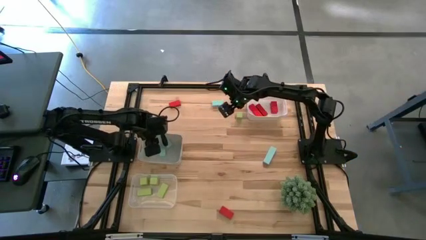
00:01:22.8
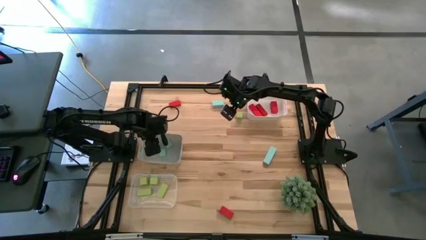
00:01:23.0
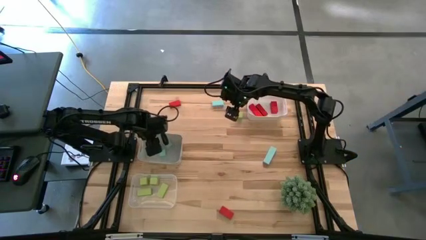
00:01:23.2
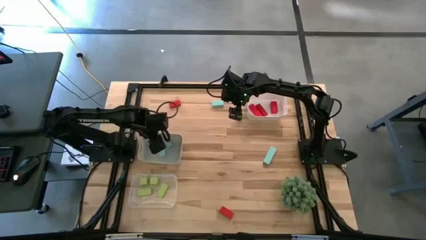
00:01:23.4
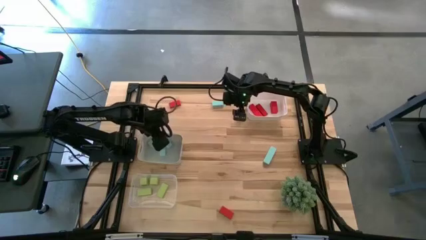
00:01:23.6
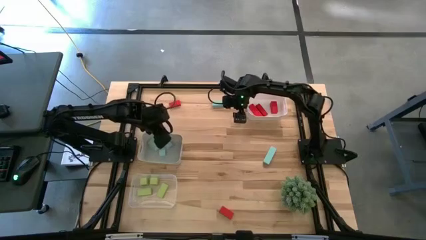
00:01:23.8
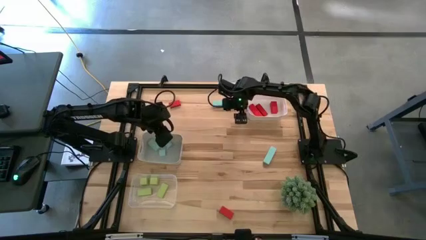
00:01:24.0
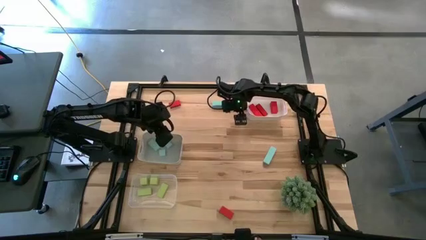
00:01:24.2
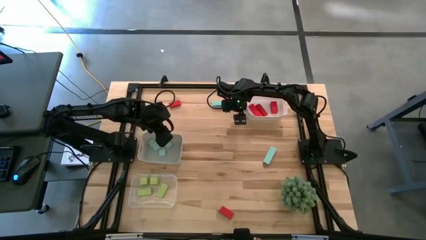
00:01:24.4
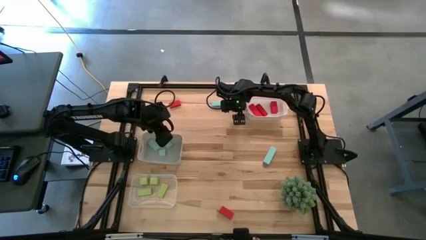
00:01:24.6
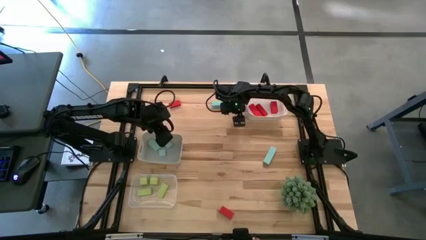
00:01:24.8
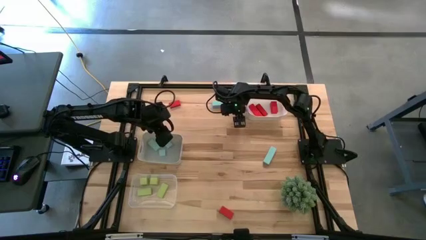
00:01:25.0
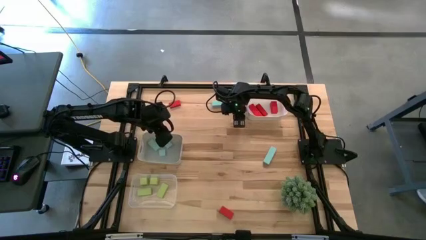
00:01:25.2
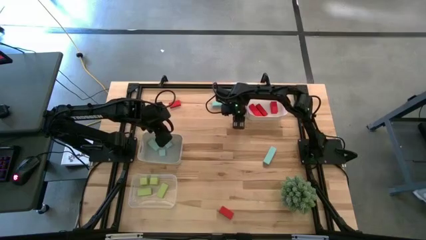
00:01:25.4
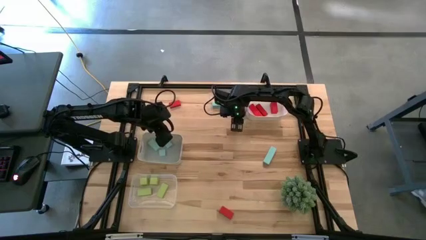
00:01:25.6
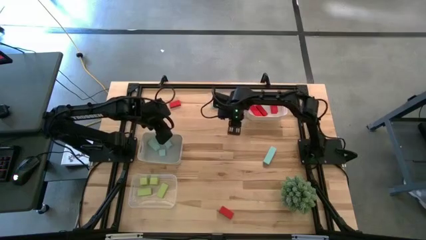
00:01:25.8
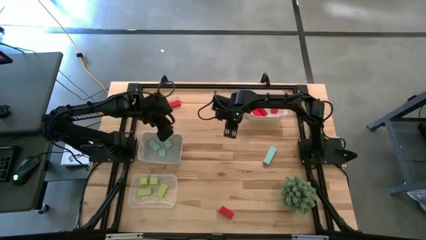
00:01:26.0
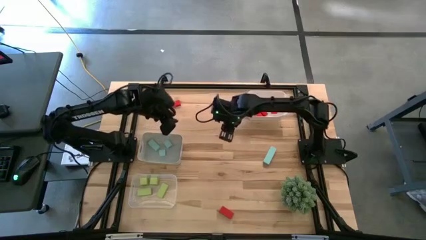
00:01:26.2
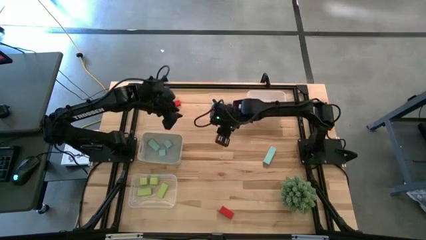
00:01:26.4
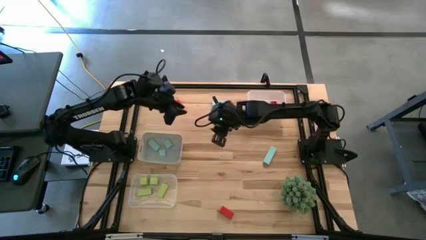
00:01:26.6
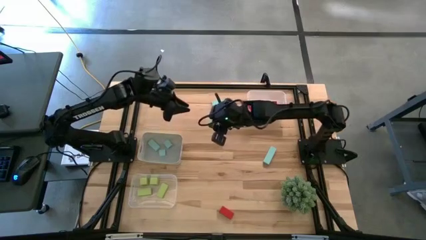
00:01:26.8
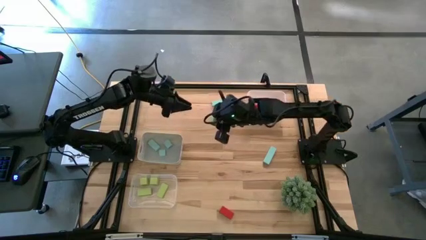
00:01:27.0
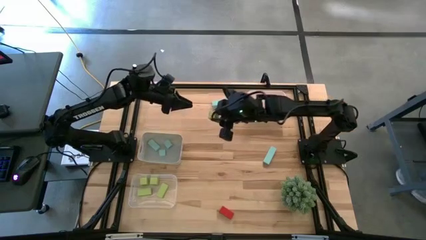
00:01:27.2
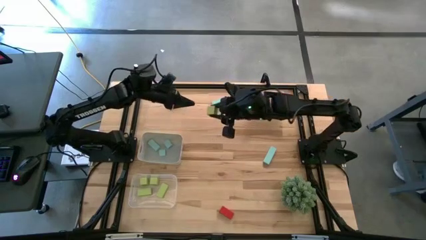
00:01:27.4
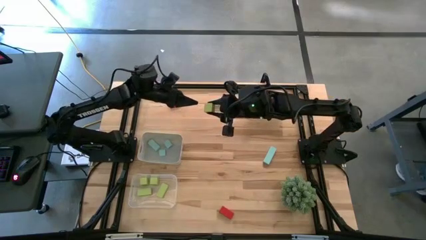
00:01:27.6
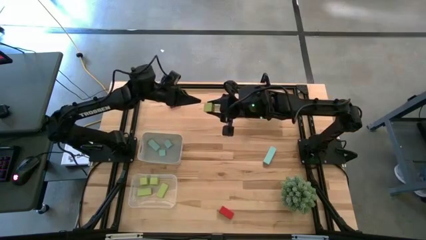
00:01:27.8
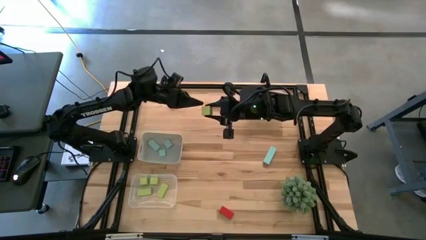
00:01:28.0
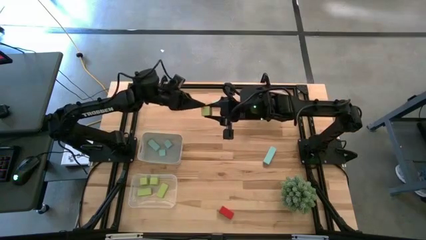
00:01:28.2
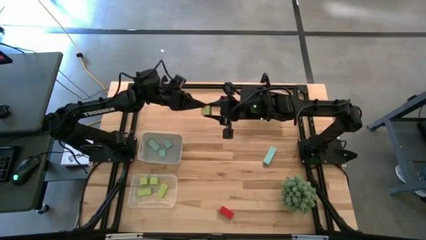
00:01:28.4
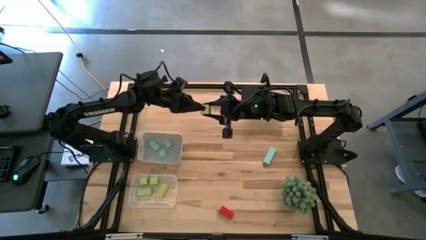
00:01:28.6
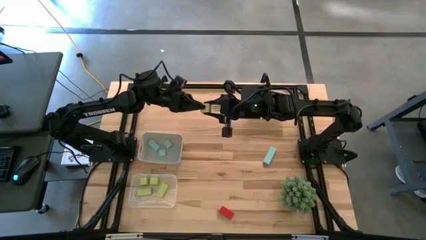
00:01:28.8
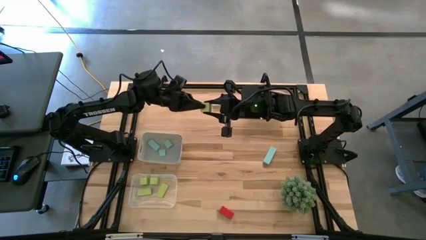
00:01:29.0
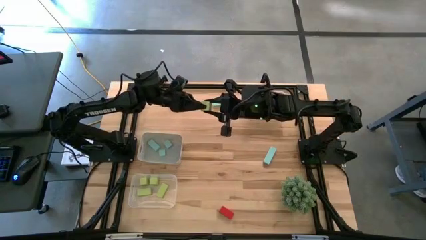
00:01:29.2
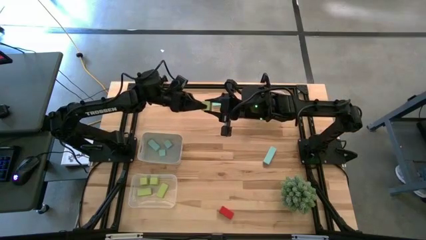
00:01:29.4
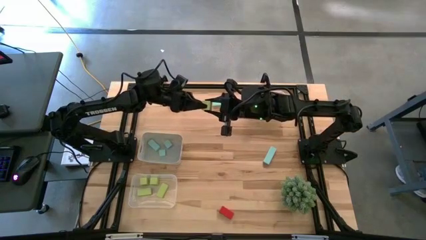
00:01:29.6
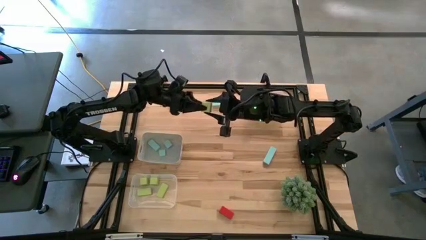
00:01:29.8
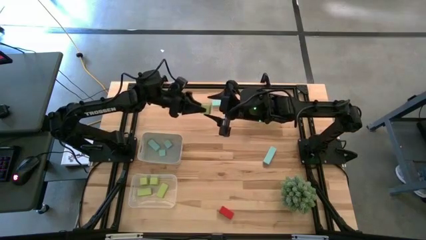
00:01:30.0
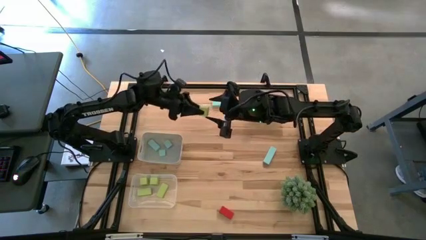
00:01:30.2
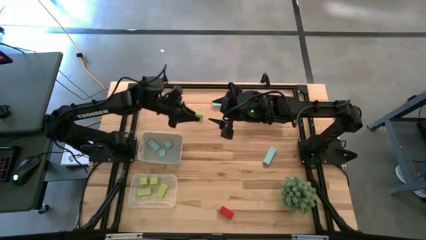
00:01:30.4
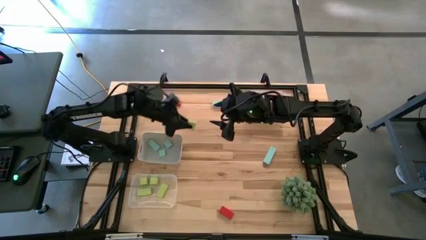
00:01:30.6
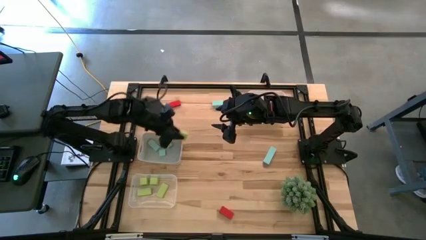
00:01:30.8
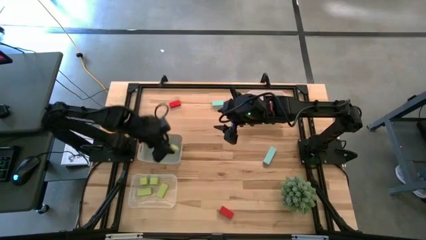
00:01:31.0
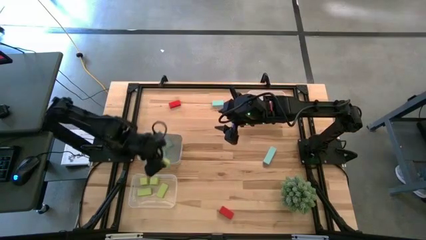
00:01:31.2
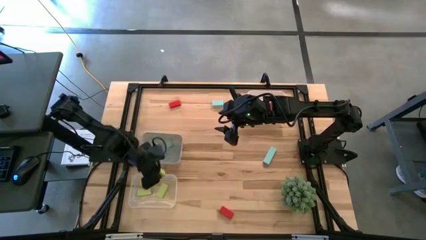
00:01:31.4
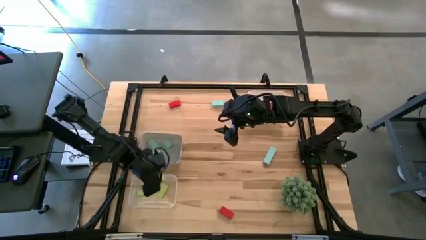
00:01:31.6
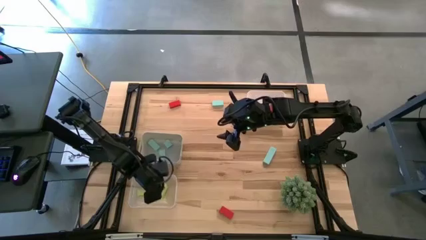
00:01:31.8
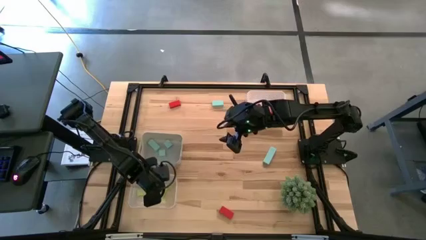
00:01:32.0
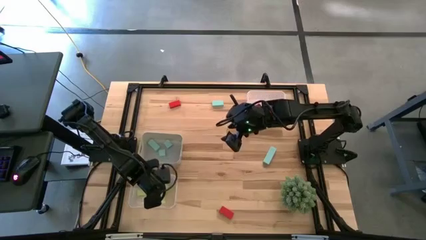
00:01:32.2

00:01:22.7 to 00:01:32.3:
Task: Sort & place blocks by color
Put the green block into the transparent bin

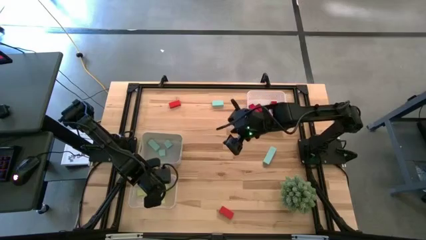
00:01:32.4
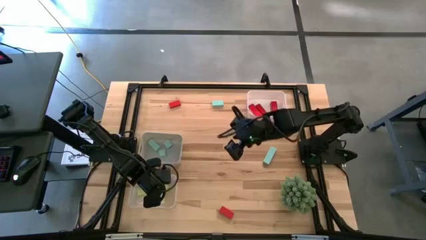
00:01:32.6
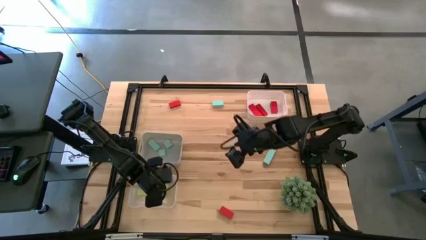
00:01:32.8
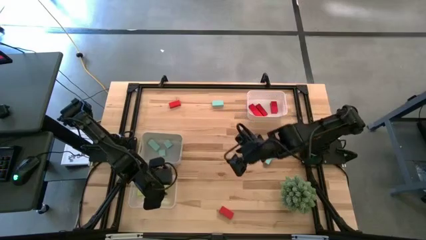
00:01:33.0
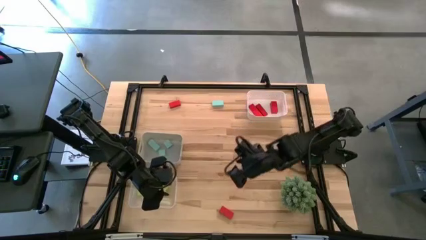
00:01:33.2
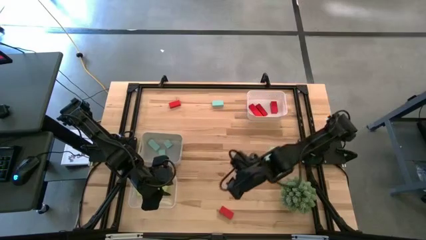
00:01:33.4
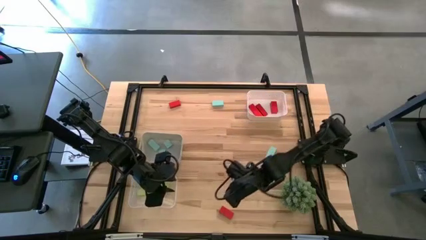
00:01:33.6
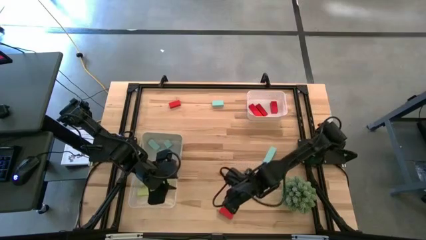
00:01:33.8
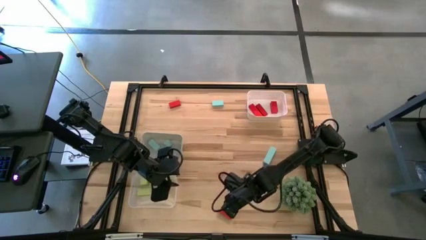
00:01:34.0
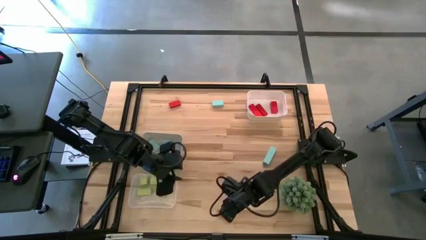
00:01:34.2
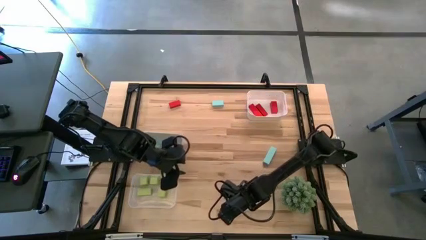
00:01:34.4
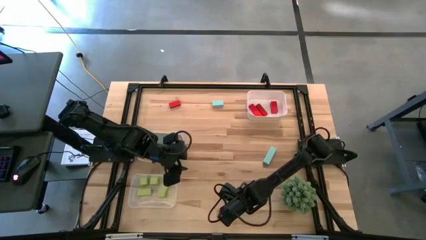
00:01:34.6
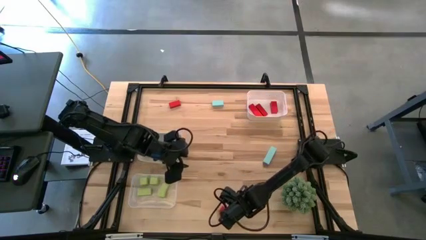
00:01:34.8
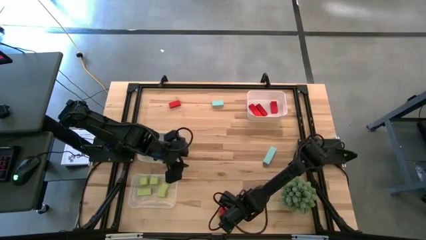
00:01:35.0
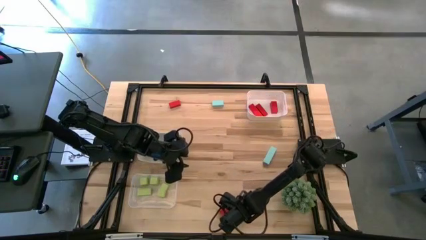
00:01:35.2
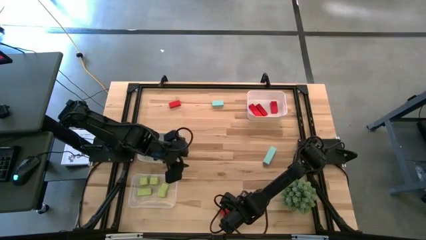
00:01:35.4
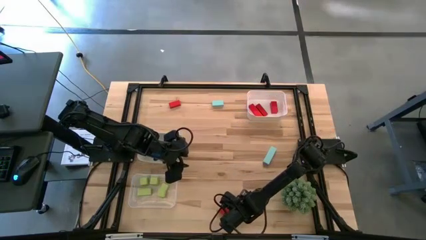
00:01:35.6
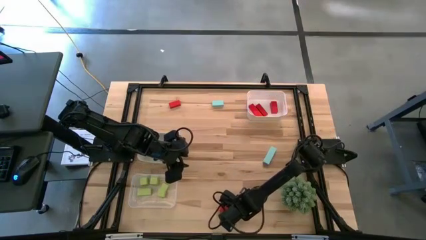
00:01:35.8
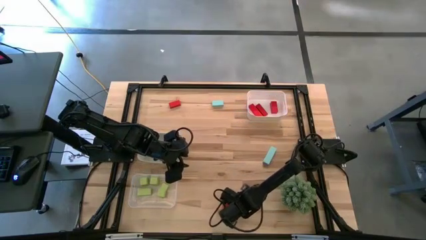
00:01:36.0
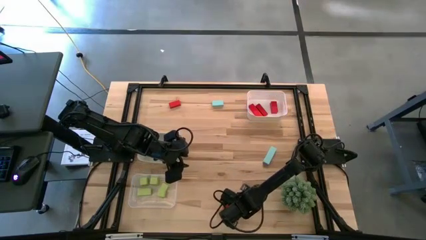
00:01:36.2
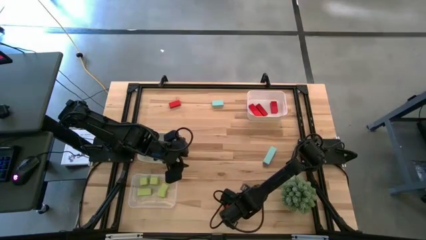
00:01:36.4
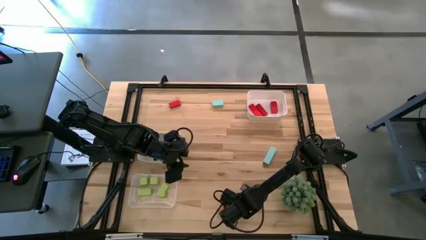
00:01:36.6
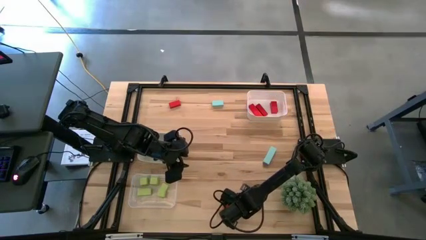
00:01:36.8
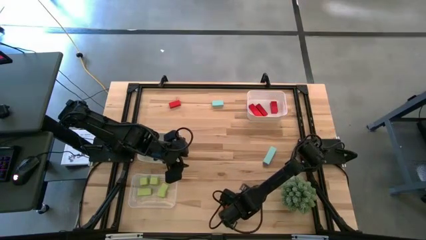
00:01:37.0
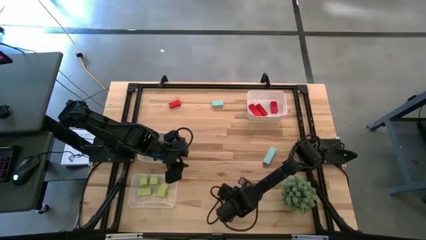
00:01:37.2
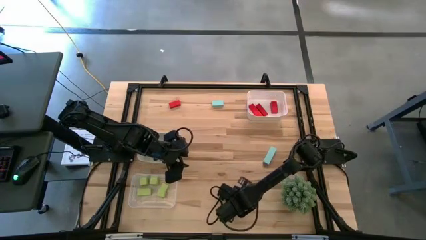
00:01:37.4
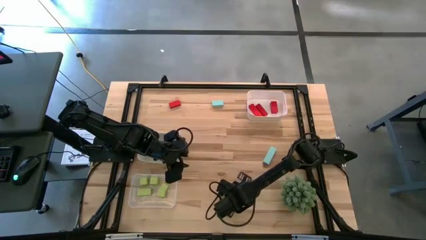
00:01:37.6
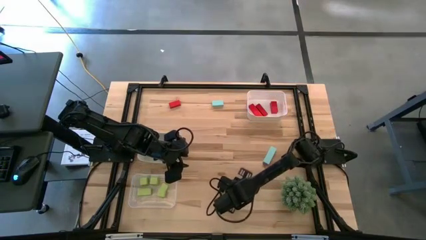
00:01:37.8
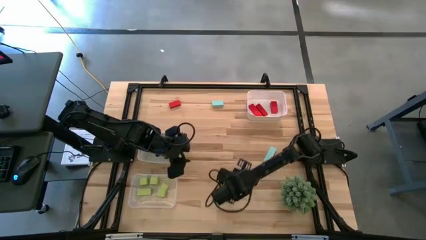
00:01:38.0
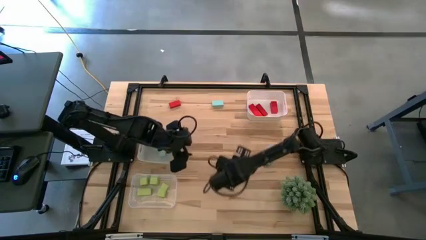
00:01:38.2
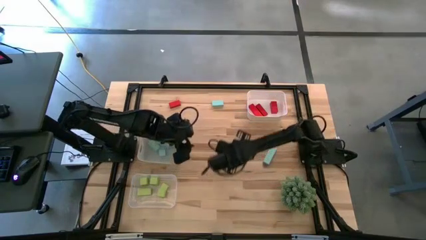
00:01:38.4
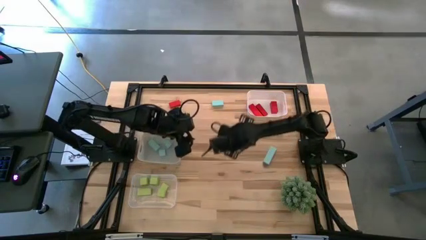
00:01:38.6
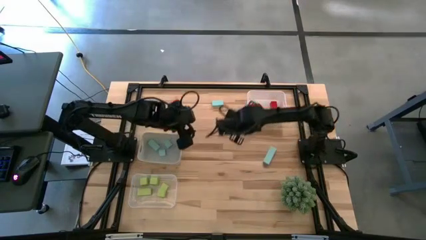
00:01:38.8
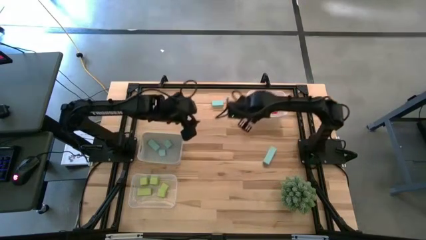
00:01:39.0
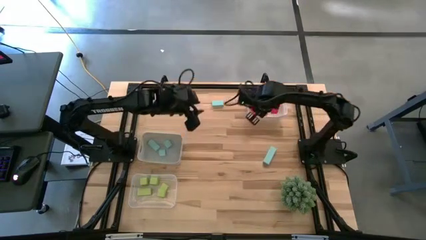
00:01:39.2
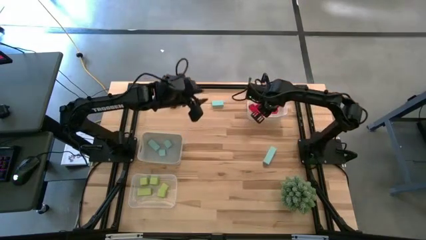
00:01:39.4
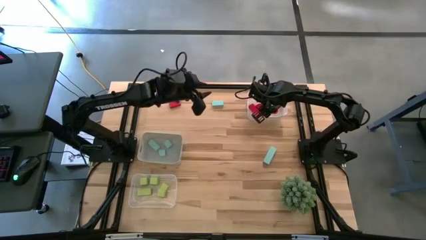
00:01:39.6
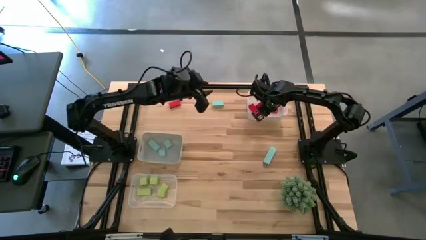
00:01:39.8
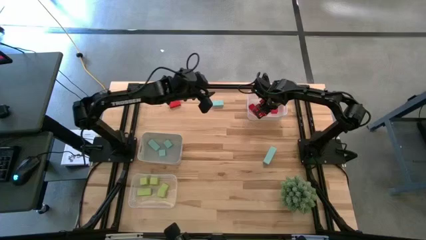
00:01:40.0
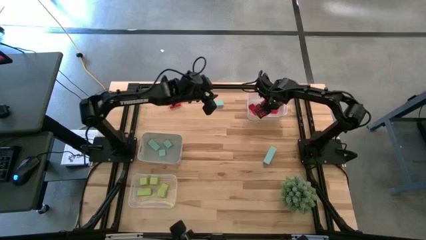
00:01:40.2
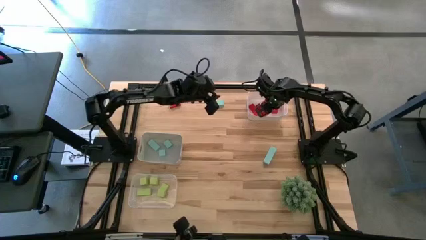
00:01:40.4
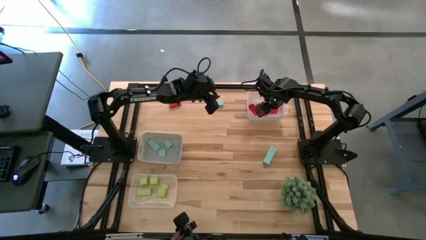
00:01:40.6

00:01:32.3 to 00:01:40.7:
Put the red block into the white bin
